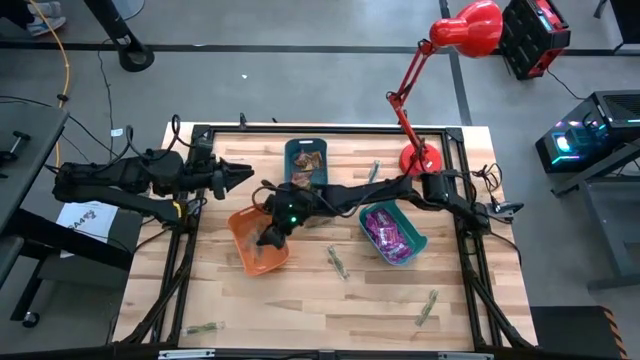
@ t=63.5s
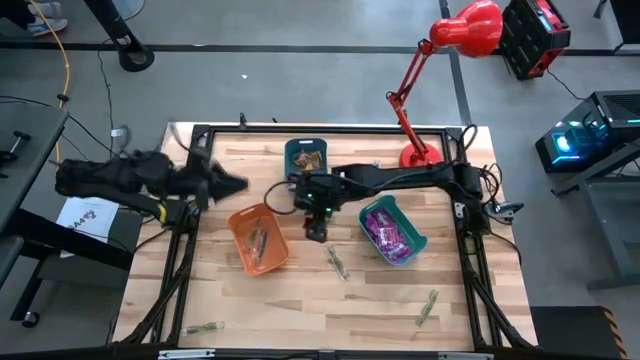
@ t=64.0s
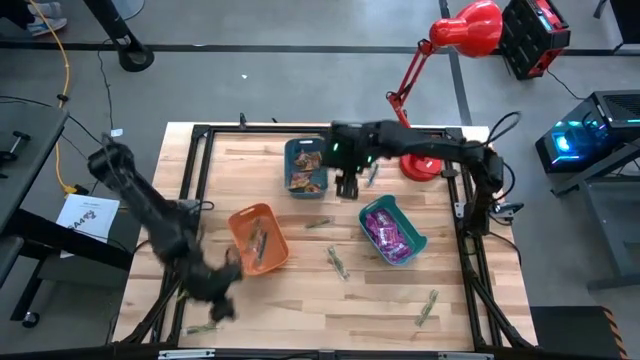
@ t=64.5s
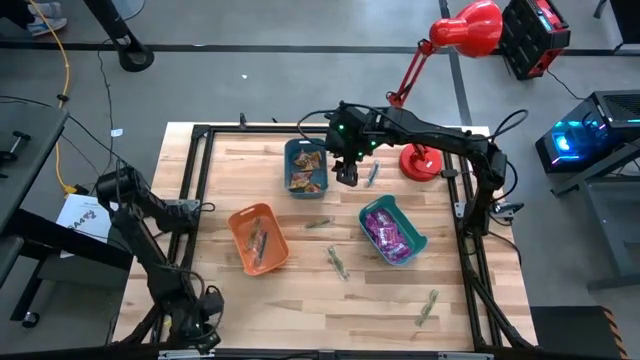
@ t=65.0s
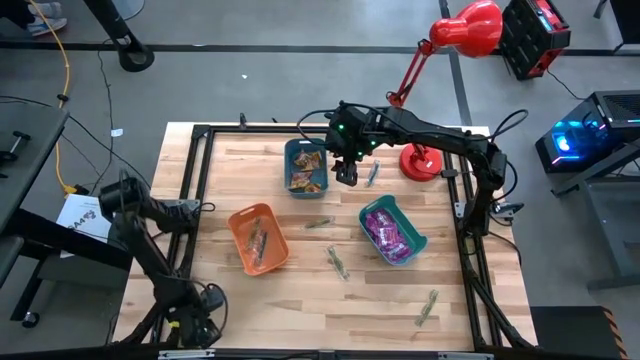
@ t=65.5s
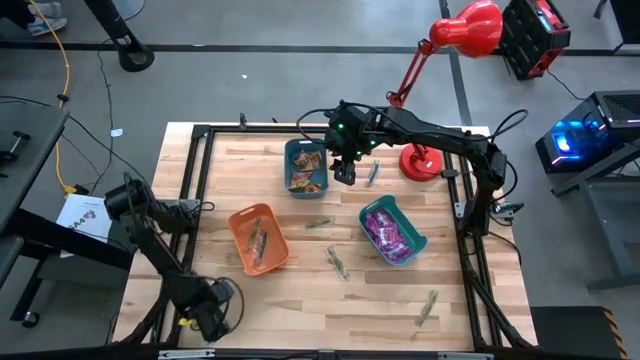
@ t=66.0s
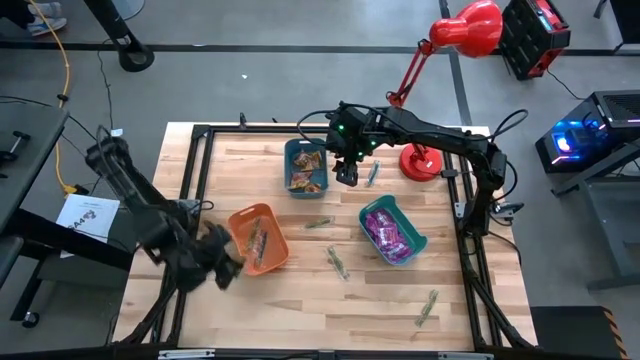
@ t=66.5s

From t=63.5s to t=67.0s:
Task: Sort candy
Put the green candy into the orange bin

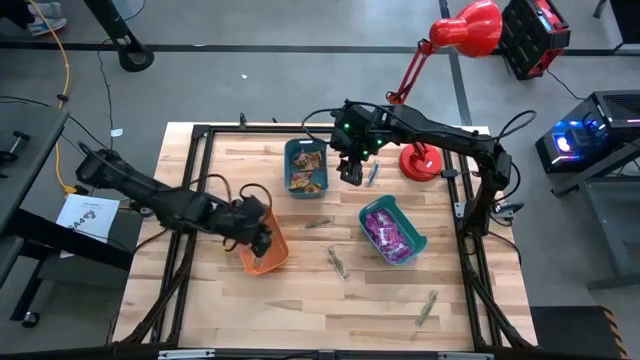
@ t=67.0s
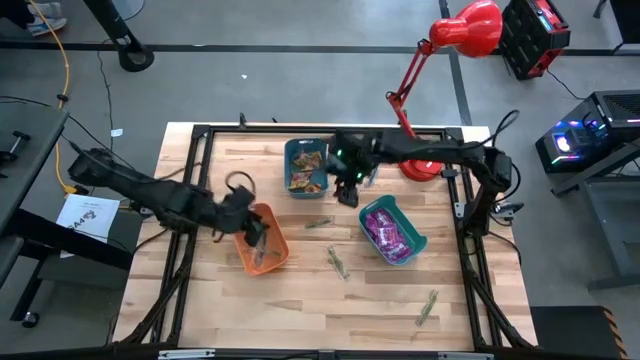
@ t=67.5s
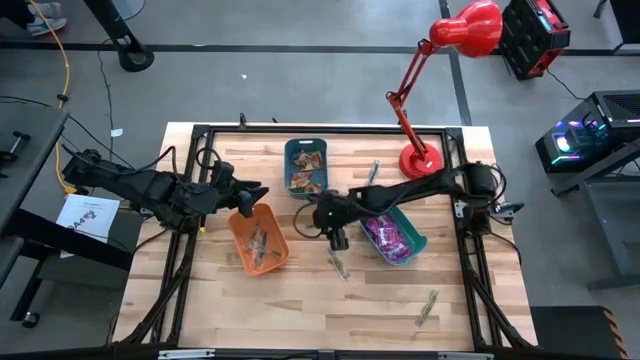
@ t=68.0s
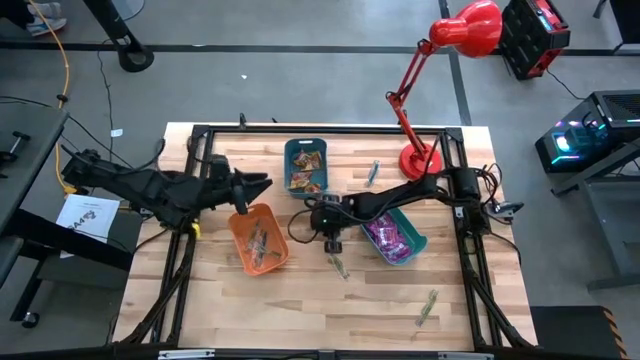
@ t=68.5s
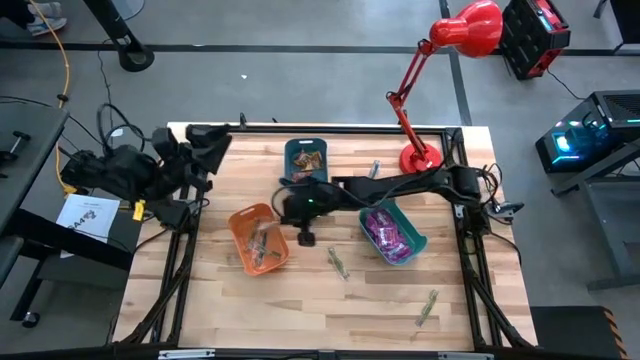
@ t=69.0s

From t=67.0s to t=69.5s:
Put the green candy into the orange bin

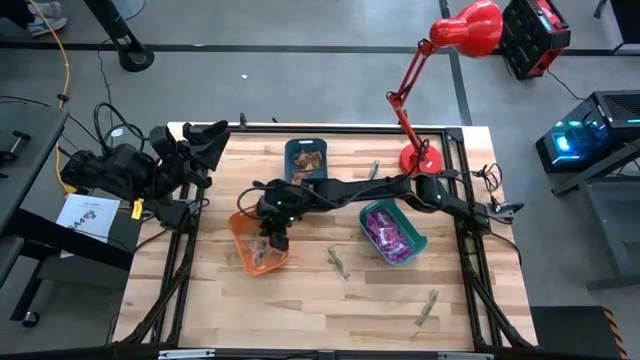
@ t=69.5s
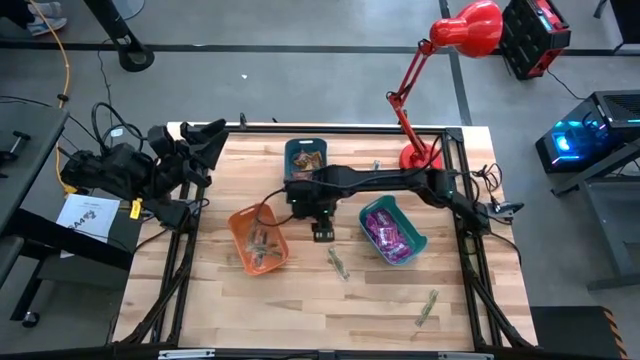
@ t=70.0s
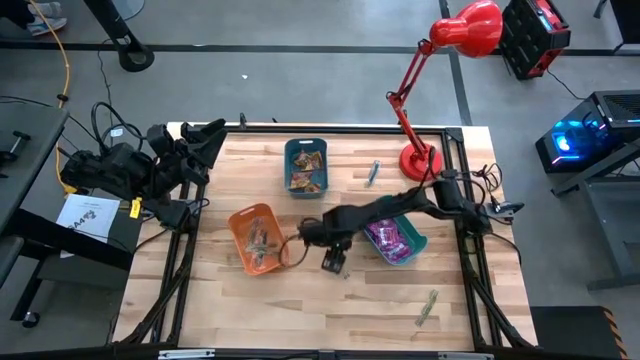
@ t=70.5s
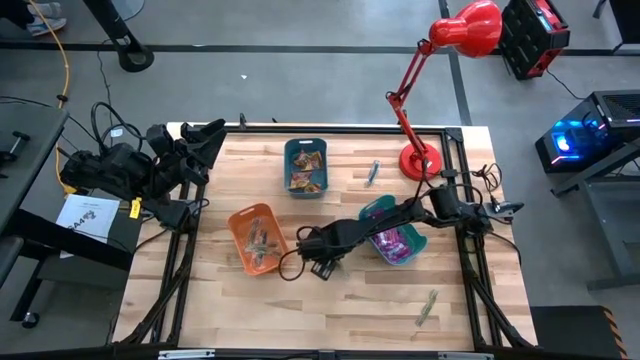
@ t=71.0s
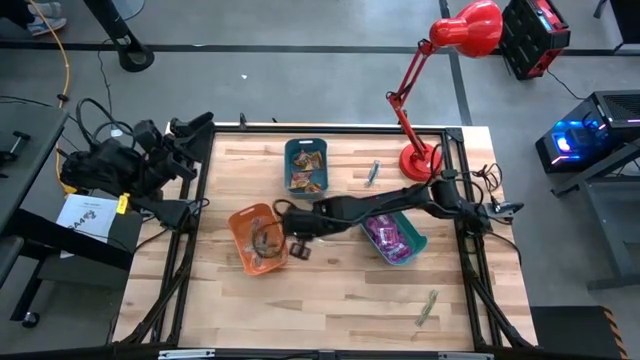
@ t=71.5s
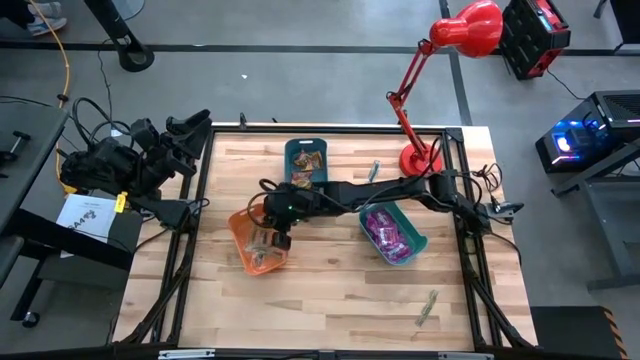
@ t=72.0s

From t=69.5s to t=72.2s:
Put the green candy into the orange bin

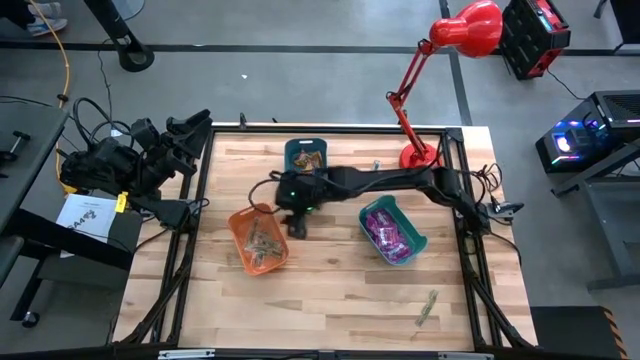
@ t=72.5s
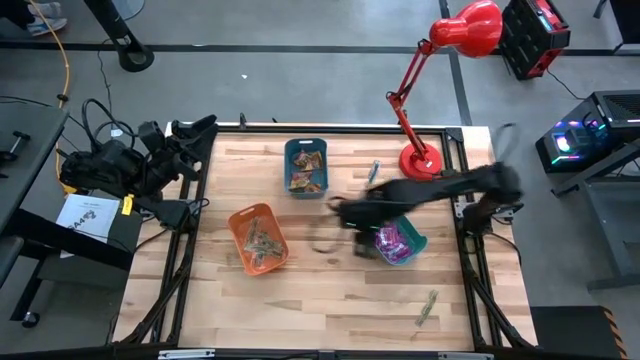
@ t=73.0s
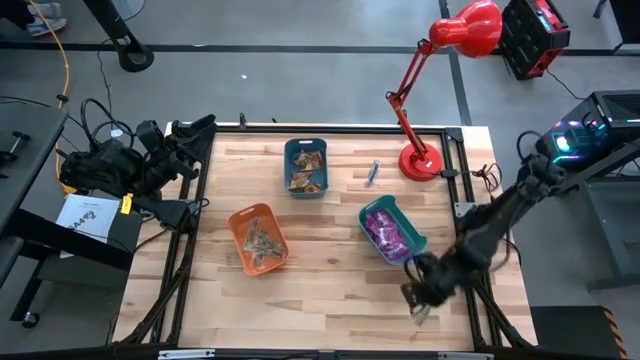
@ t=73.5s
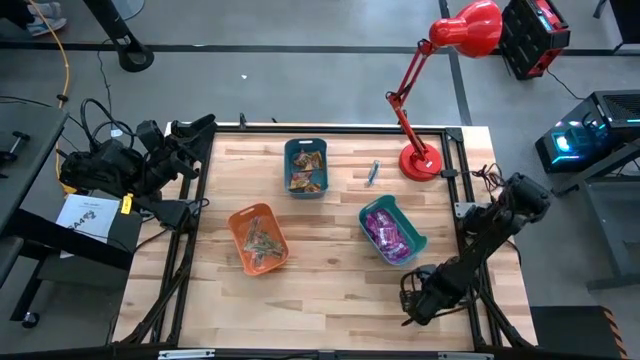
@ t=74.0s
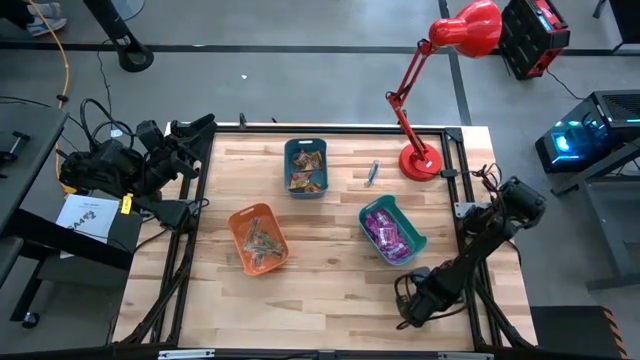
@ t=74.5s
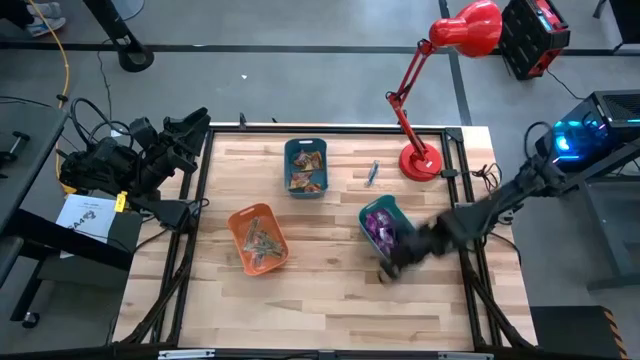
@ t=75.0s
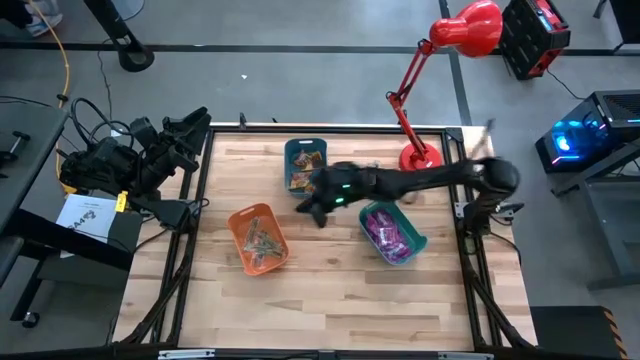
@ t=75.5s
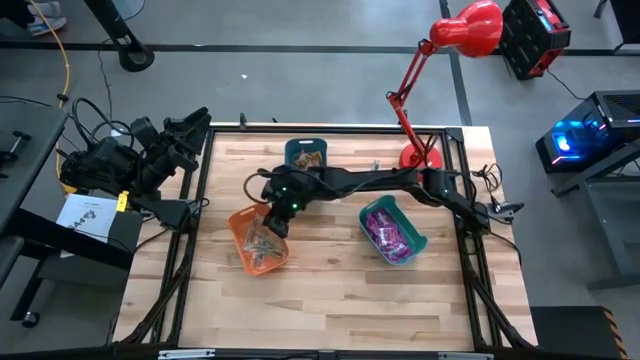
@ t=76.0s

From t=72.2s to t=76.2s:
Put the green candy into the orange bin

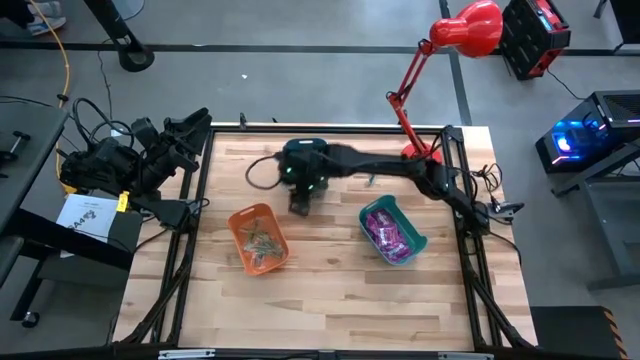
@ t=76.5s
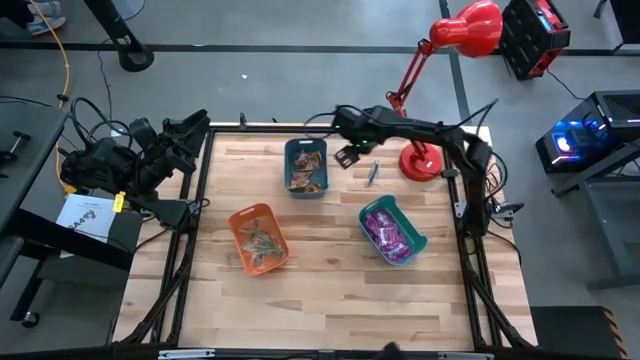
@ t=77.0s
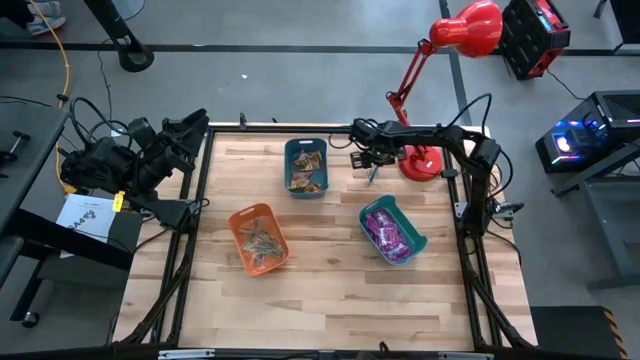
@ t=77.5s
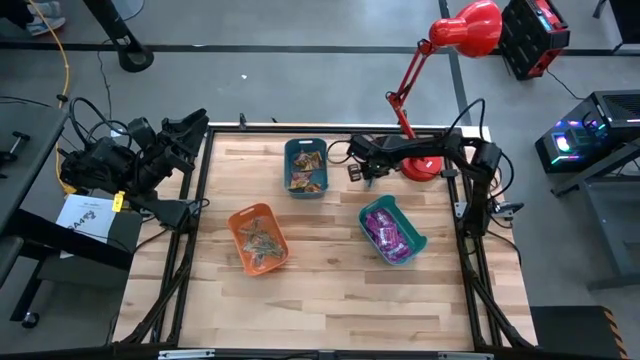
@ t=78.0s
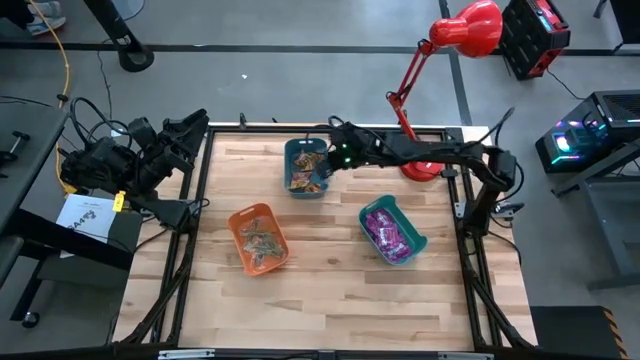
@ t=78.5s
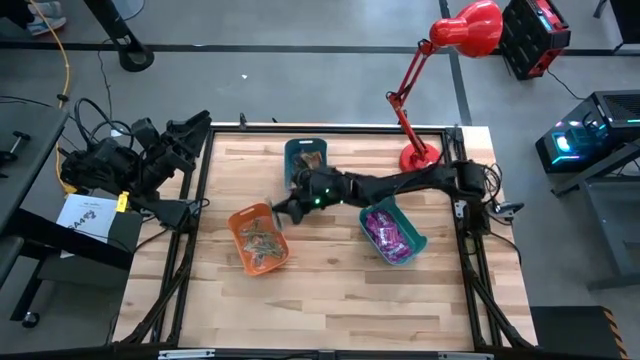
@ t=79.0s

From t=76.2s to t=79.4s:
Put the blue candy into the orange bin

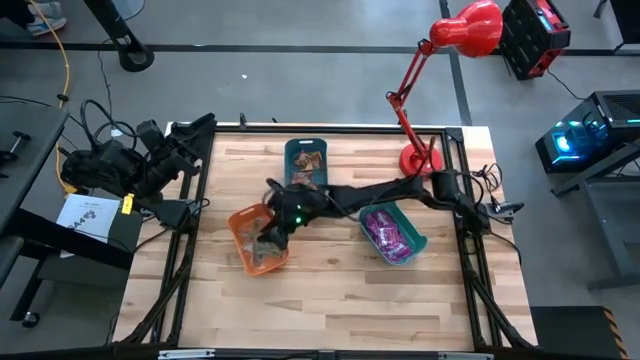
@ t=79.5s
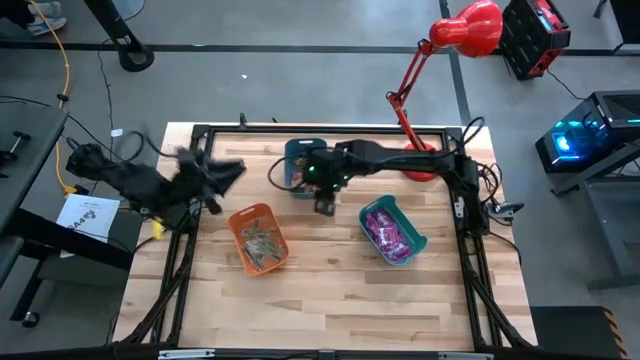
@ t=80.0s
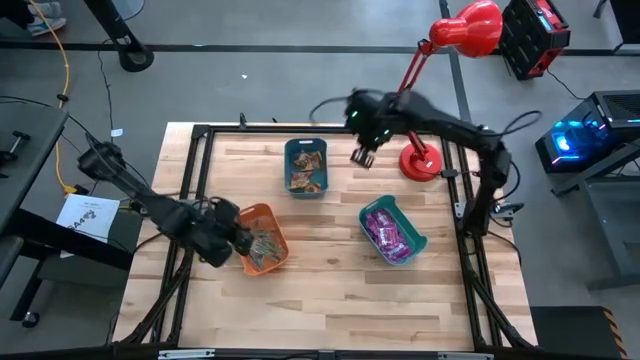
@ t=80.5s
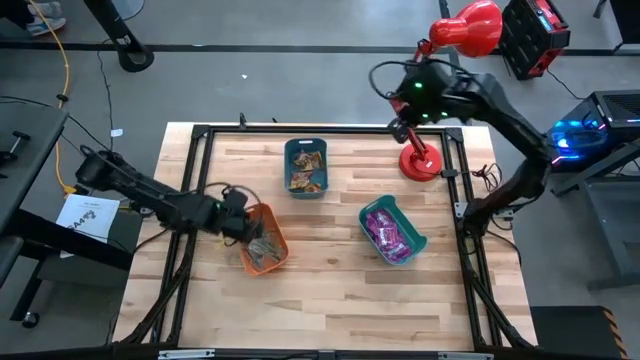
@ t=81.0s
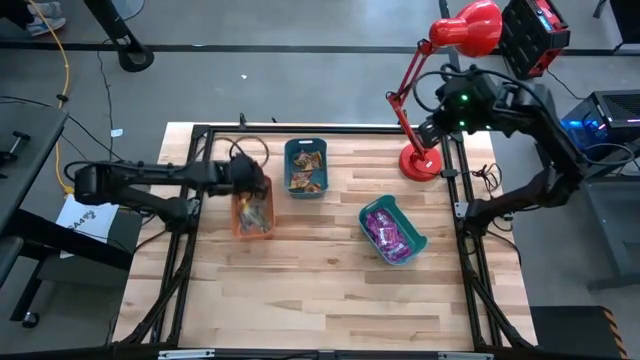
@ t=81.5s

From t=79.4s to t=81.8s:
Adjust the orange bin

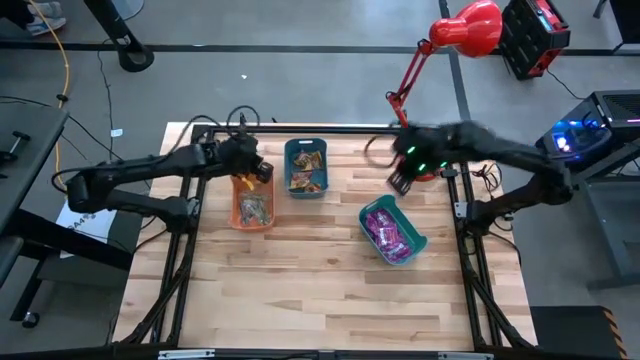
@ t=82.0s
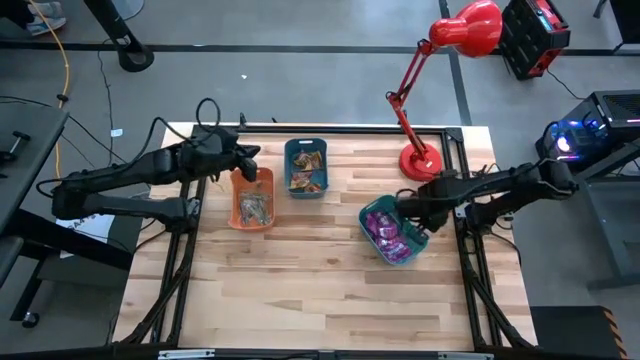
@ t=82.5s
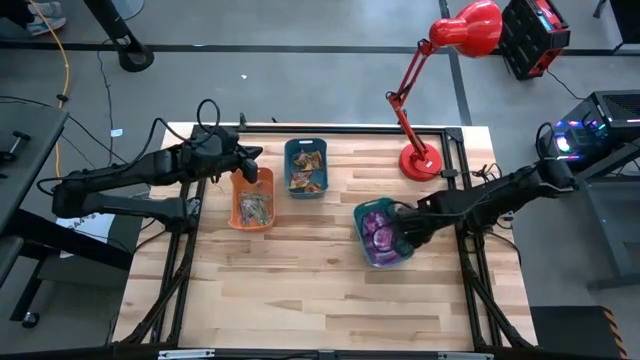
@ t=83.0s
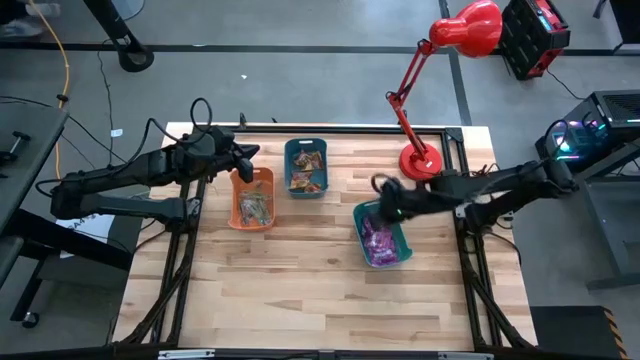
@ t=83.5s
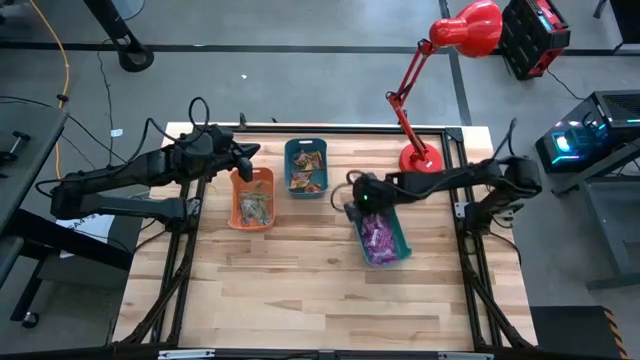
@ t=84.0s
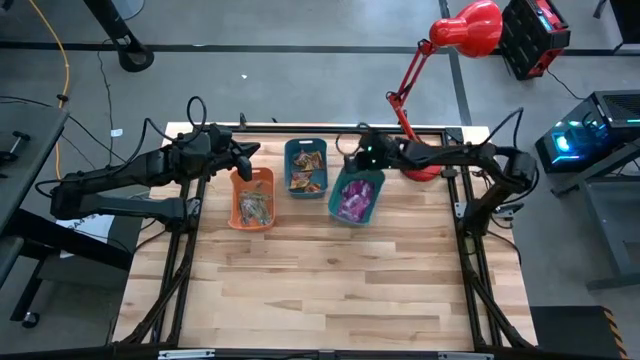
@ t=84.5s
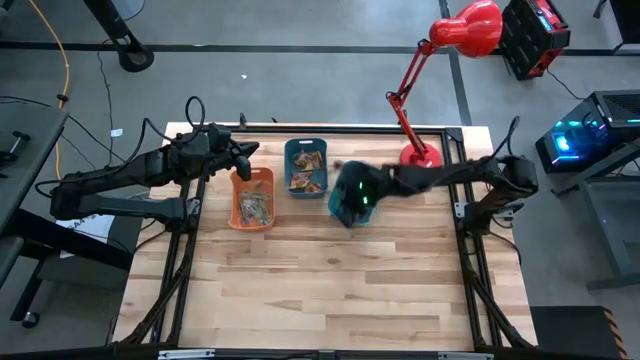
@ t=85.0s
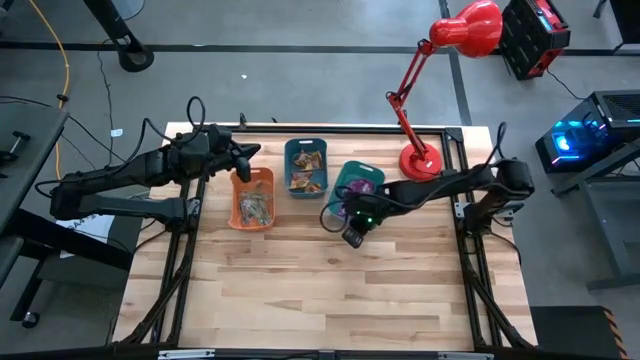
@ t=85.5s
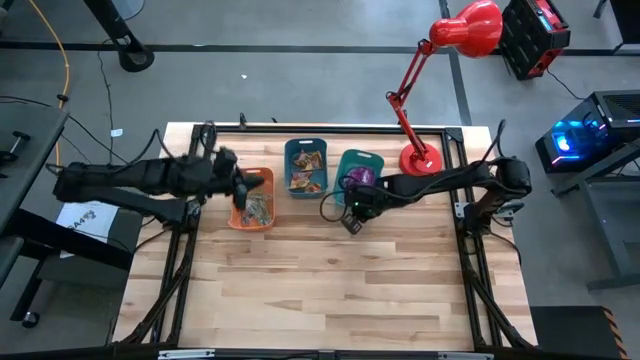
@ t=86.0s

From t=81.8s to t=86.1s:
Move the green bin to the top middle of the table beside the blue bin
